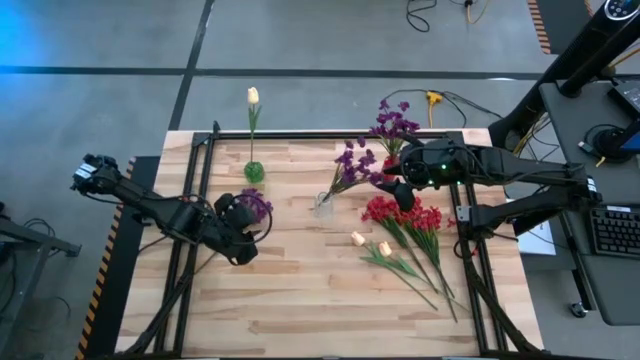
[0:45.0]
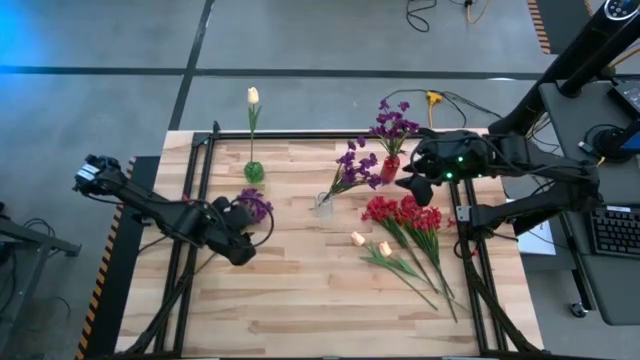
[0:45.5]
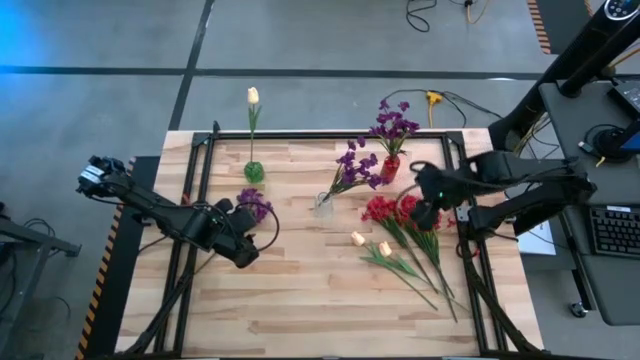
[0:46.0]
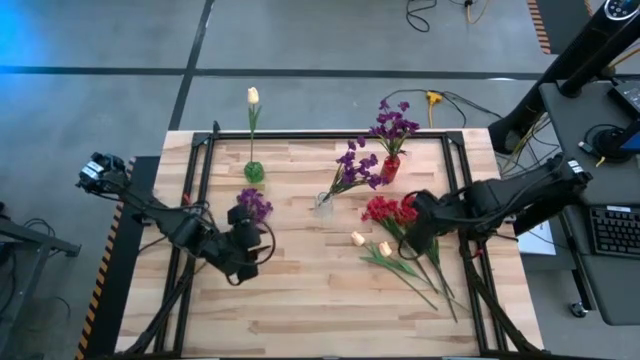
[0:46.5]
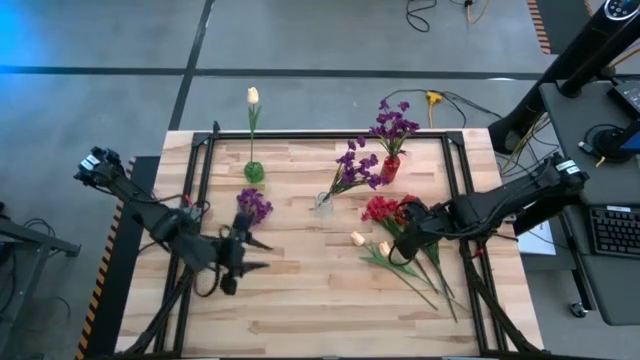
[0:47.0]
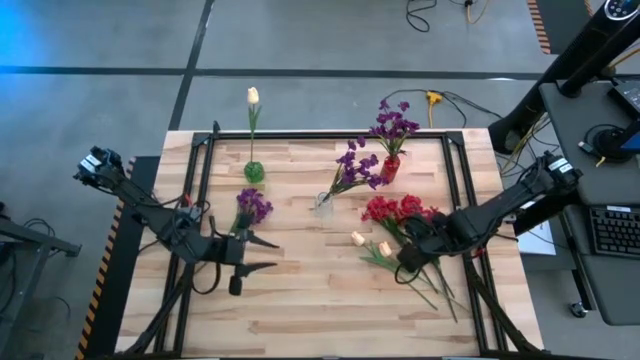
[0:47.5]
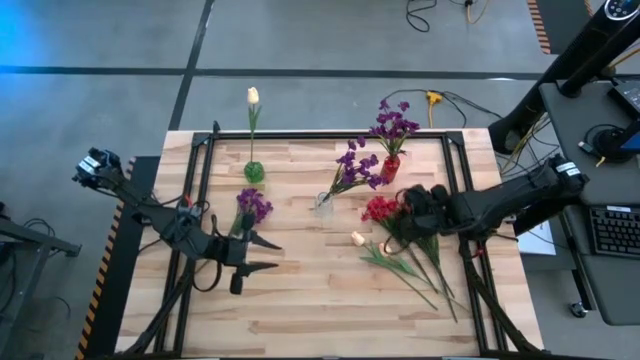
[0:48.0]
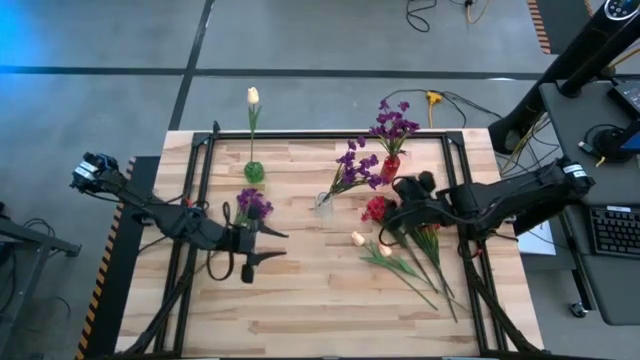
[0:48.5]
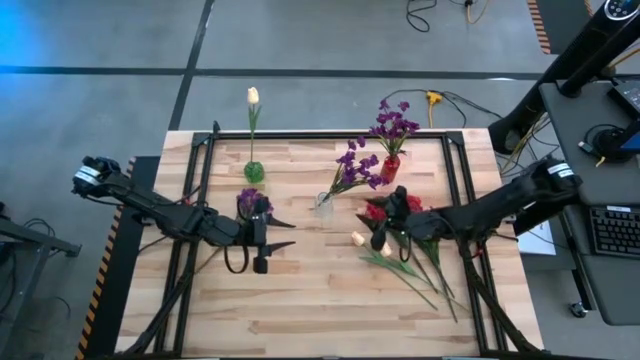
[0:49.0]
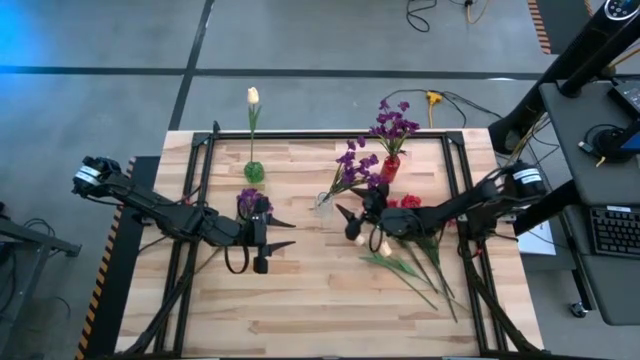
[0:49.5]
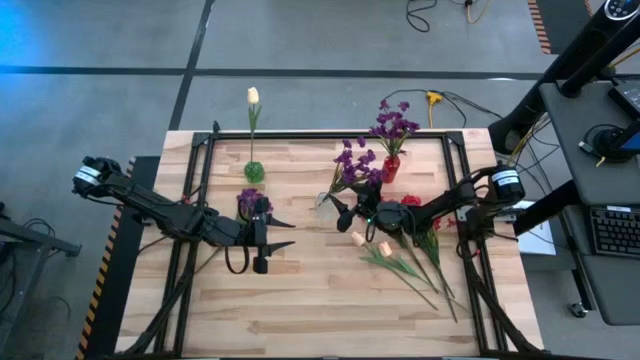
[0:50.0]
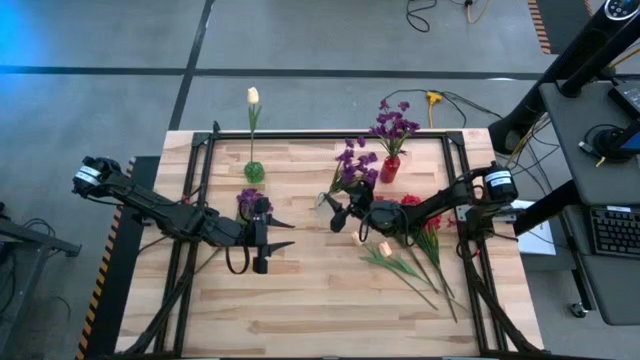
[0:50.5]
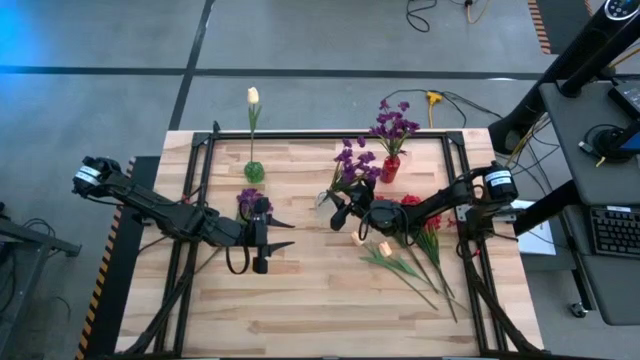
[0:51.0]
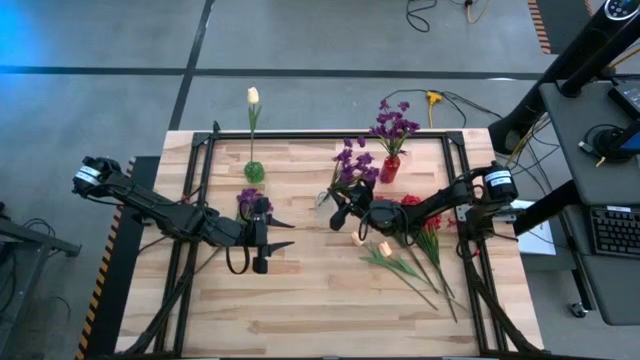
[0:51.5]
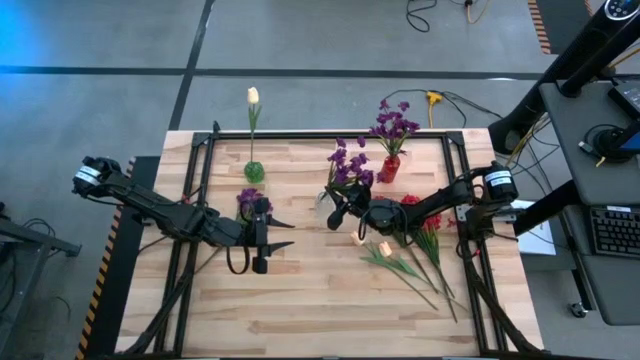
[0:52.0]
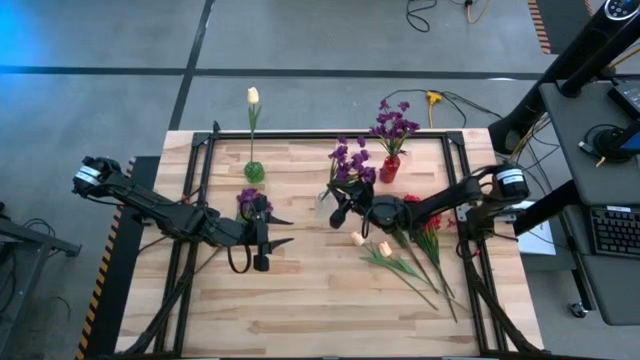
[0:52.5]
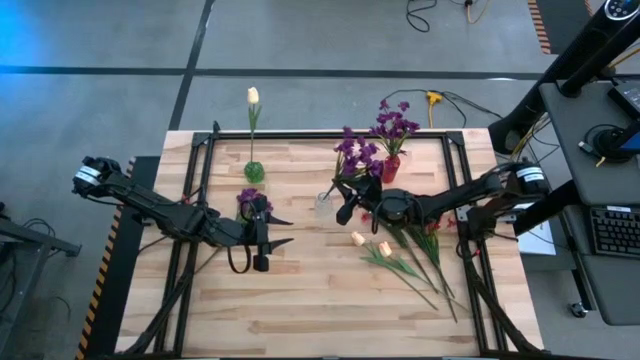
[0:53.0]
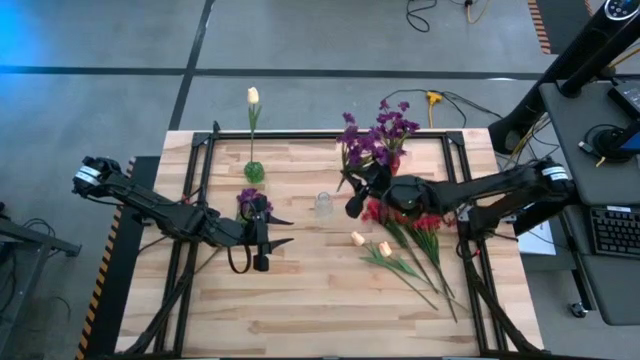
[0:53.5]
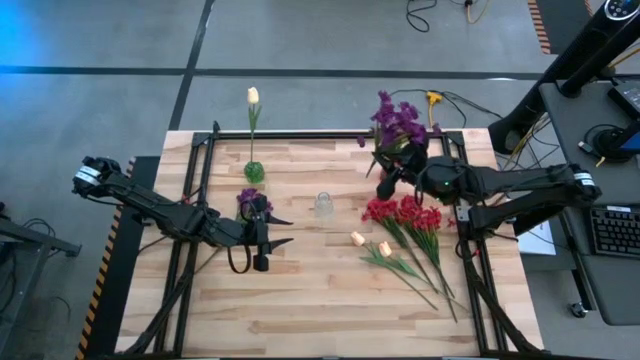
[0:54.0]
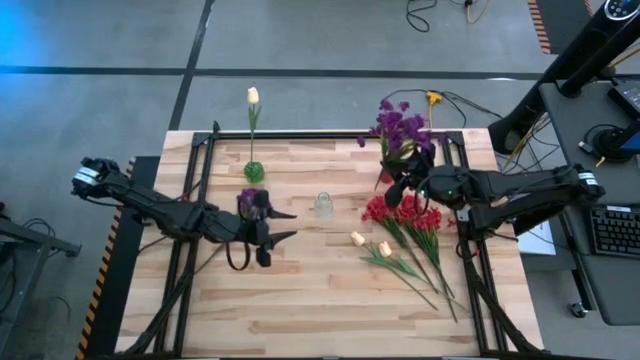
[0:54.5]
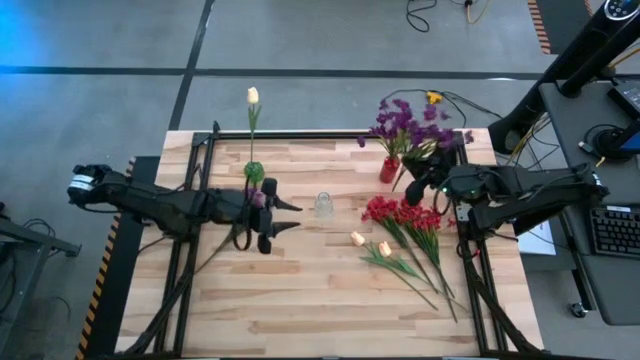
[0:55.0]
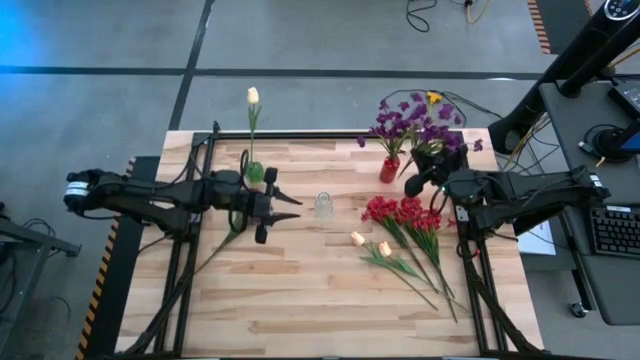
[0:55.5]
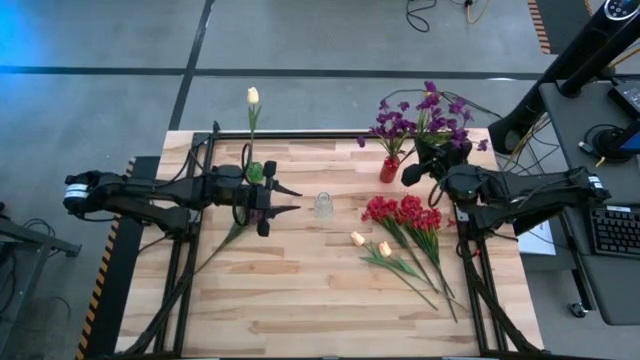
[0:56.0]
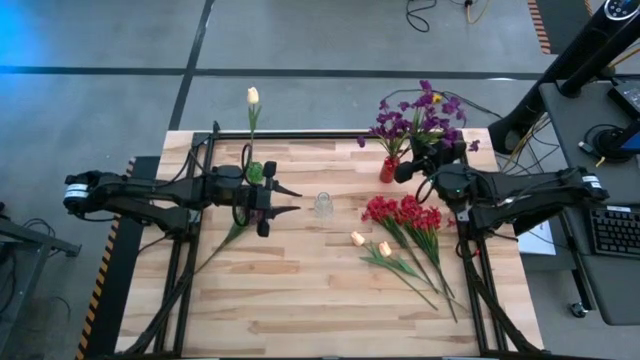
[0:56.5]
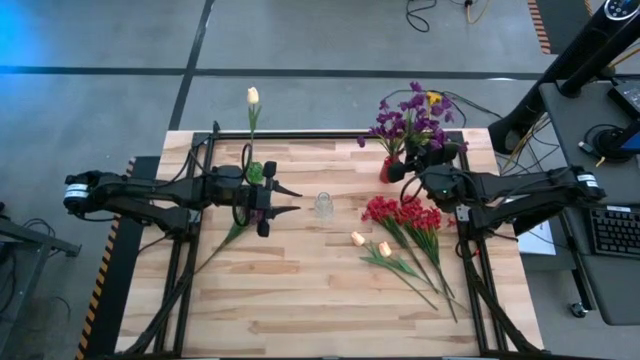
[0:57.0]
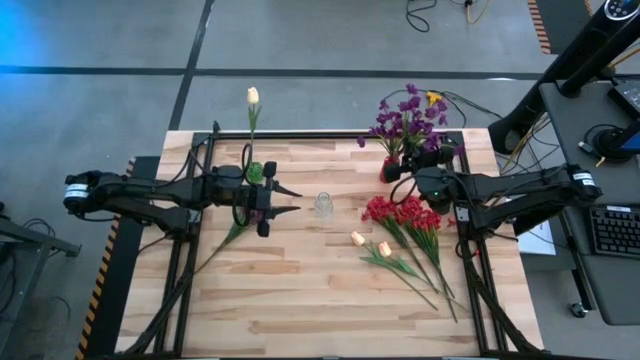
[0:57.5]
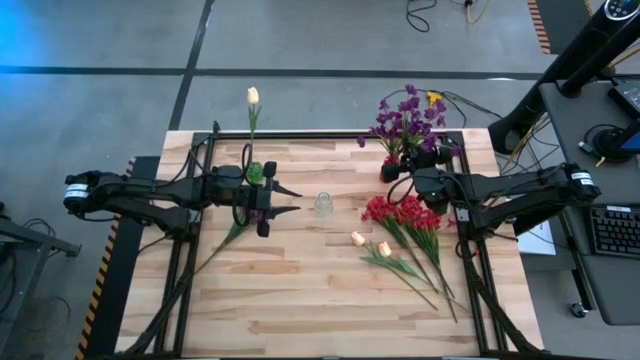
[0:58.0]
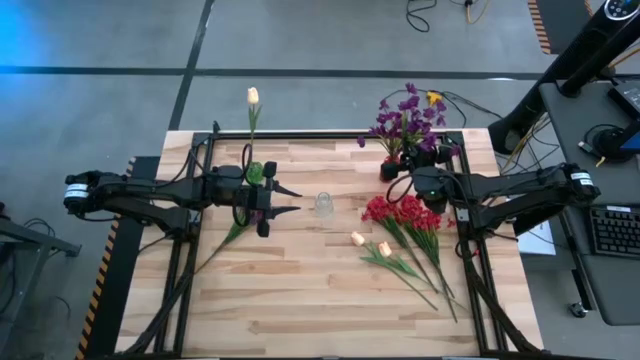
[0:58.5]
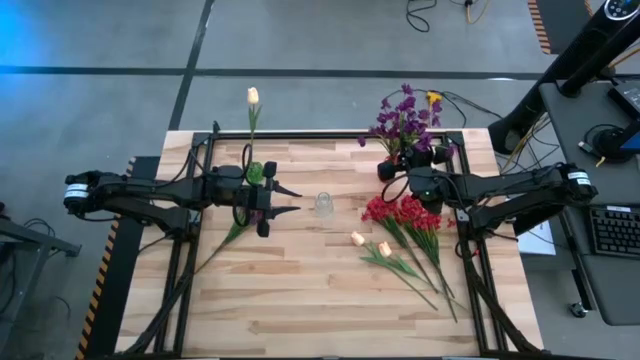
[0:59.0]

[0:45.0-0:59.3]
Task: Sort flowers into vase by color
Put the bottom violet flowers into the red vase
